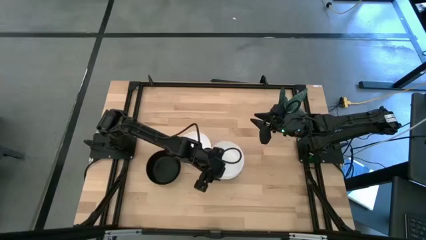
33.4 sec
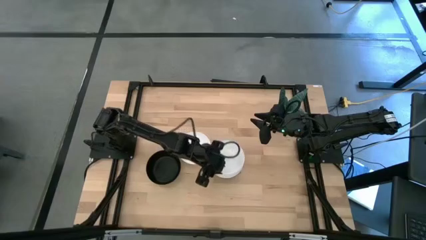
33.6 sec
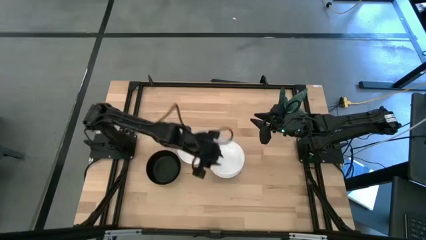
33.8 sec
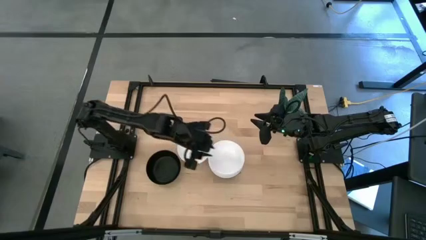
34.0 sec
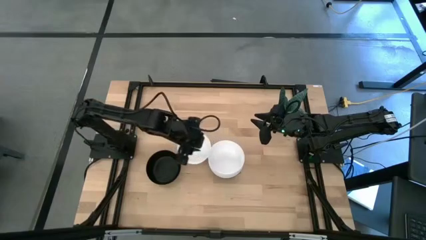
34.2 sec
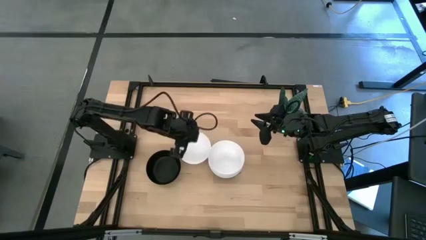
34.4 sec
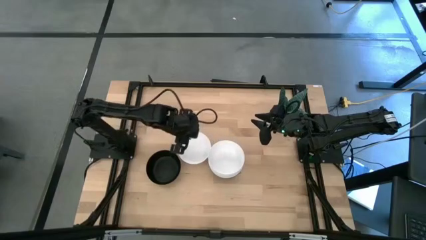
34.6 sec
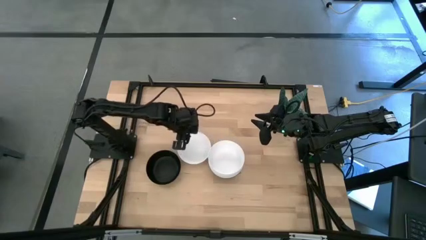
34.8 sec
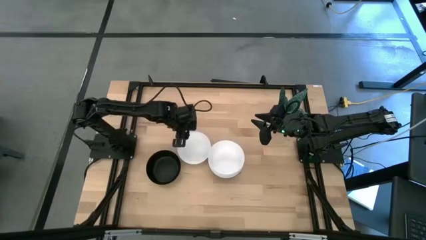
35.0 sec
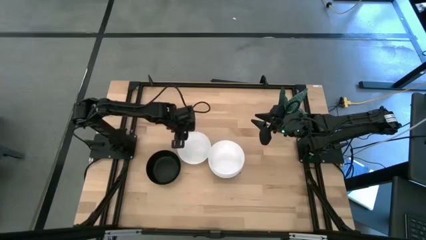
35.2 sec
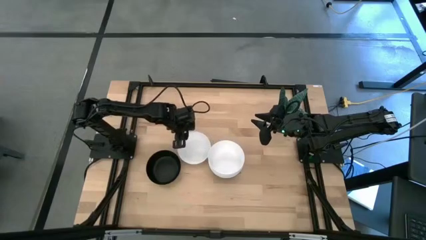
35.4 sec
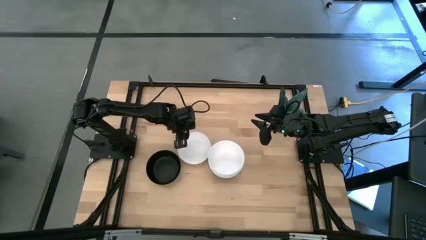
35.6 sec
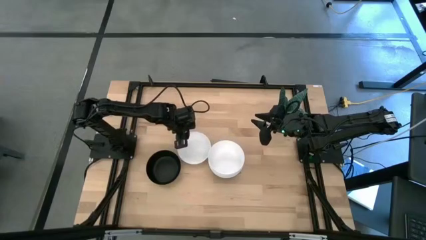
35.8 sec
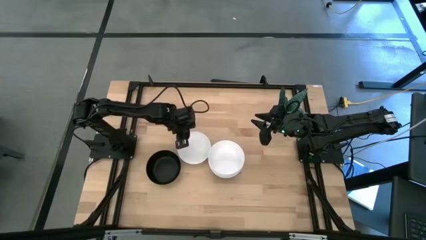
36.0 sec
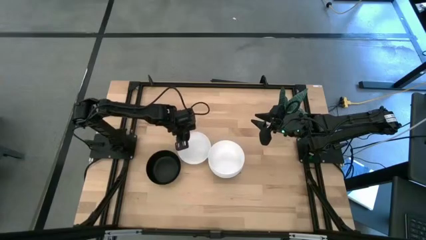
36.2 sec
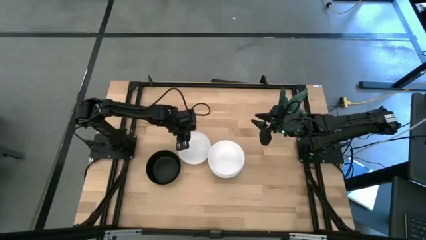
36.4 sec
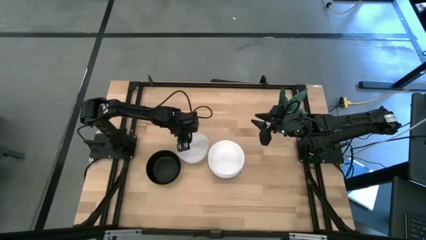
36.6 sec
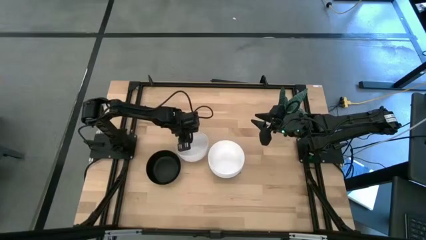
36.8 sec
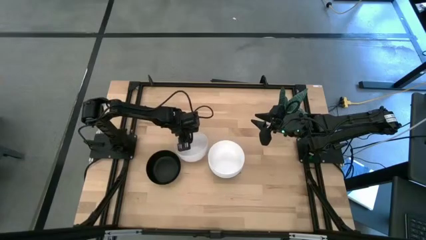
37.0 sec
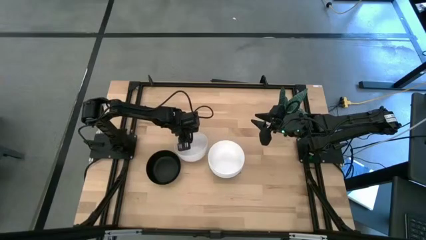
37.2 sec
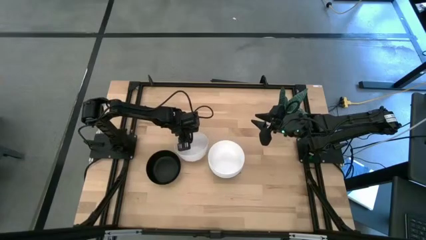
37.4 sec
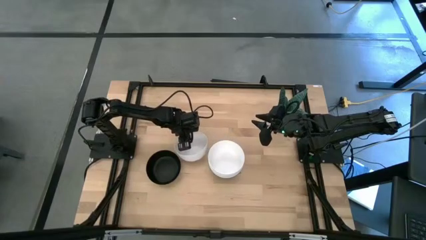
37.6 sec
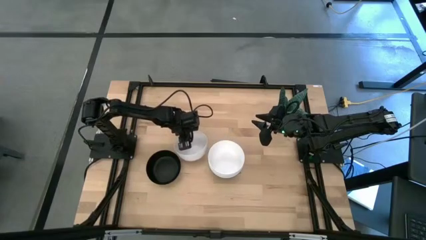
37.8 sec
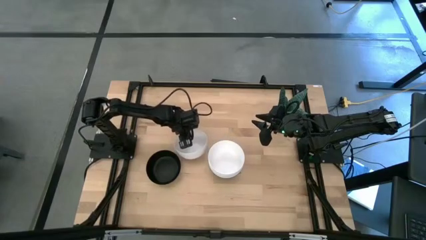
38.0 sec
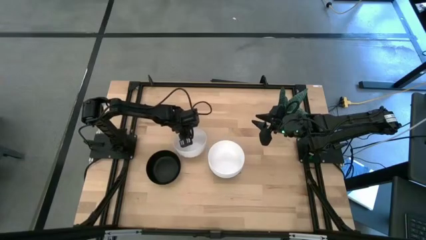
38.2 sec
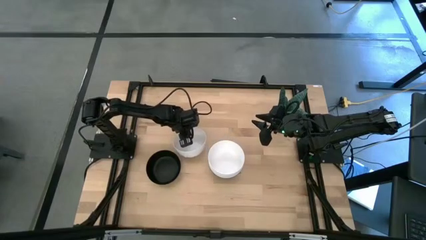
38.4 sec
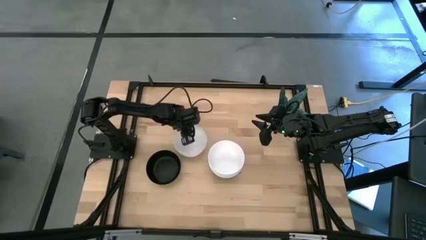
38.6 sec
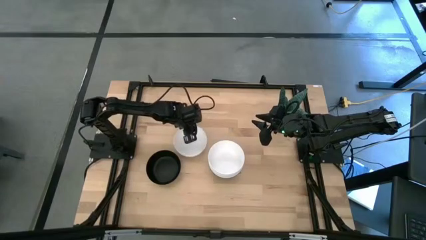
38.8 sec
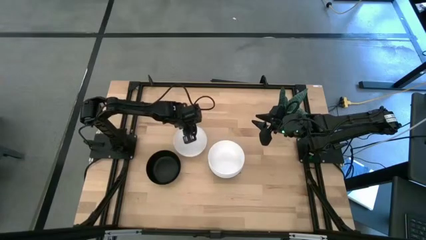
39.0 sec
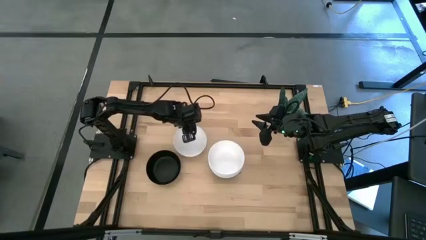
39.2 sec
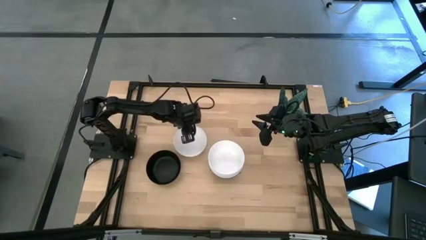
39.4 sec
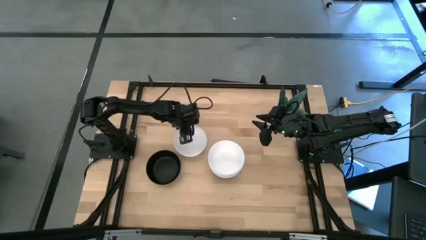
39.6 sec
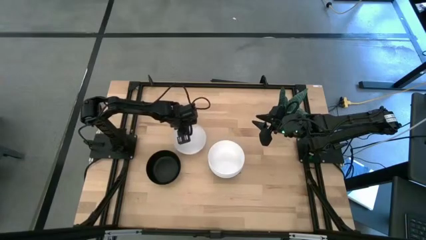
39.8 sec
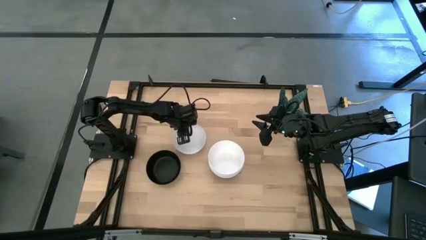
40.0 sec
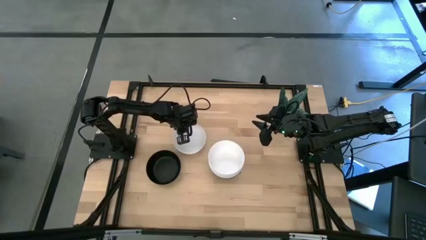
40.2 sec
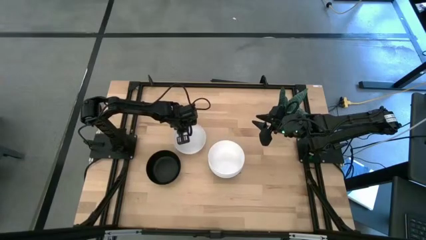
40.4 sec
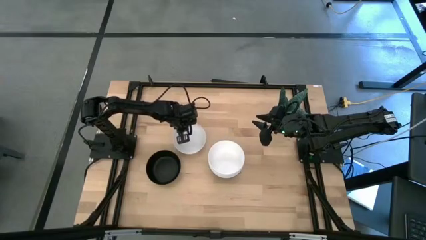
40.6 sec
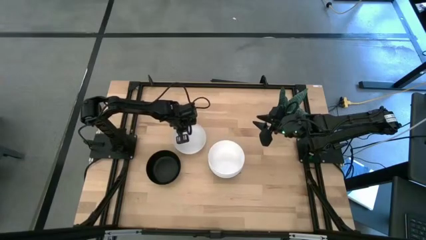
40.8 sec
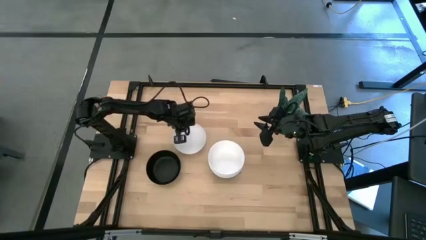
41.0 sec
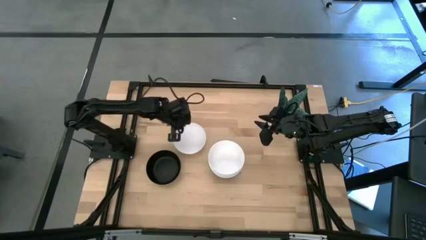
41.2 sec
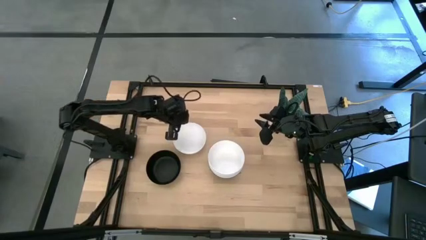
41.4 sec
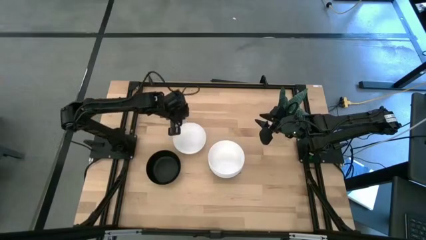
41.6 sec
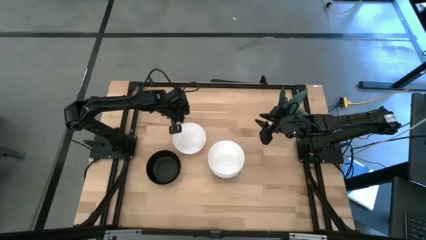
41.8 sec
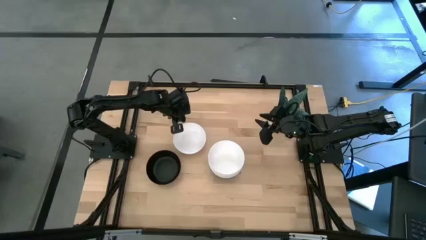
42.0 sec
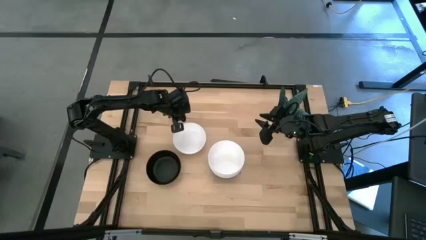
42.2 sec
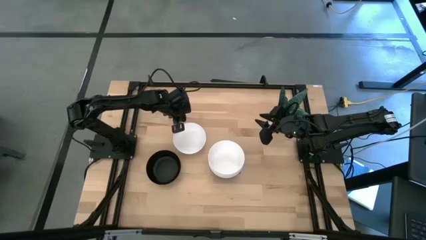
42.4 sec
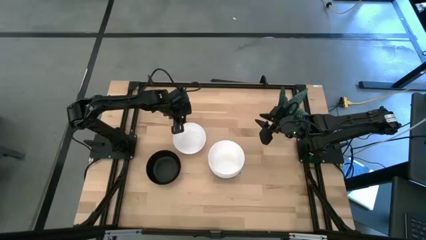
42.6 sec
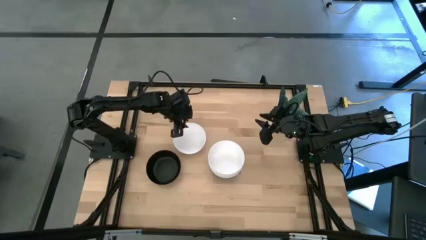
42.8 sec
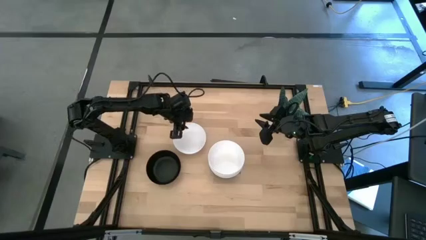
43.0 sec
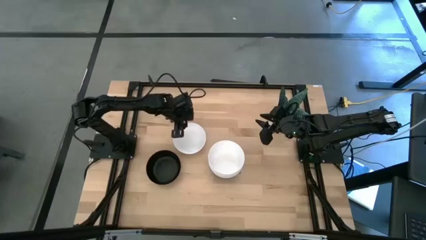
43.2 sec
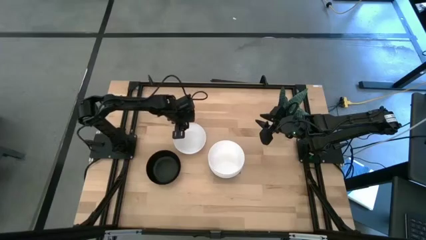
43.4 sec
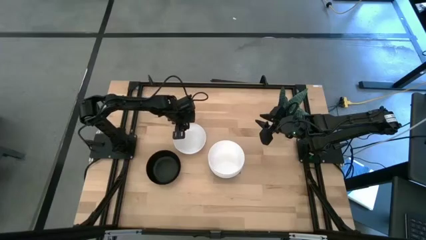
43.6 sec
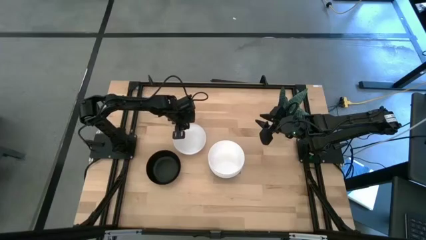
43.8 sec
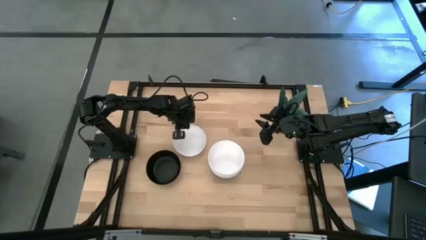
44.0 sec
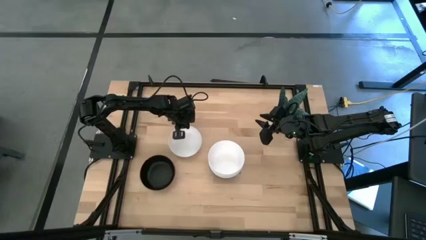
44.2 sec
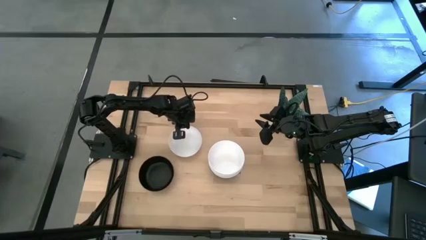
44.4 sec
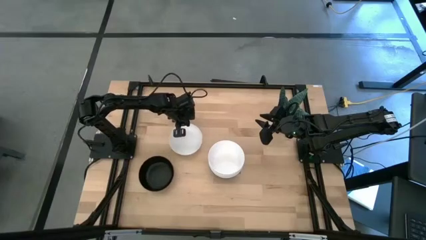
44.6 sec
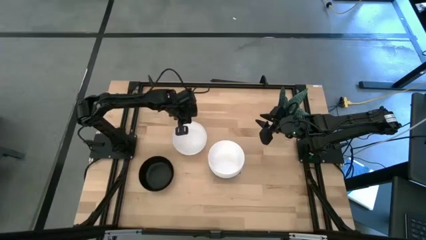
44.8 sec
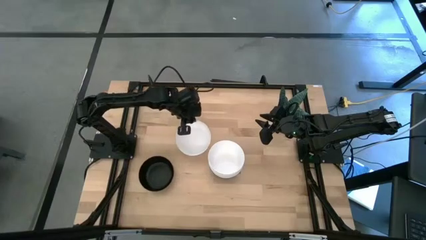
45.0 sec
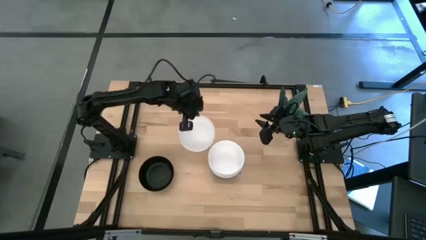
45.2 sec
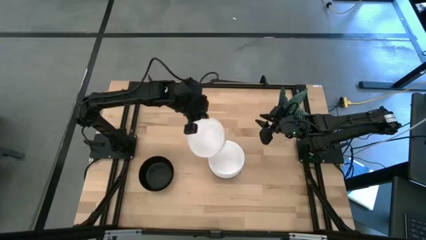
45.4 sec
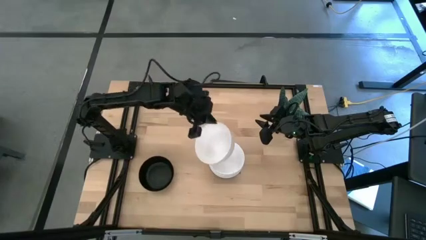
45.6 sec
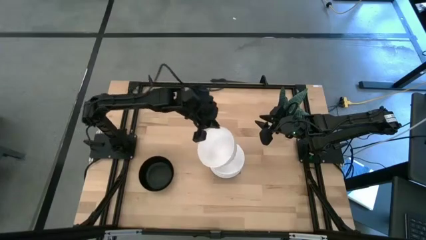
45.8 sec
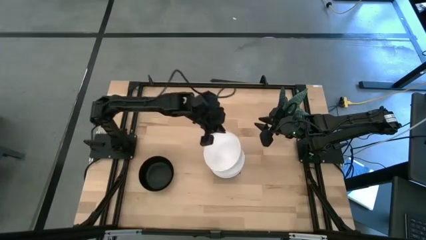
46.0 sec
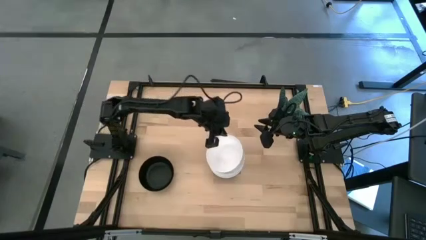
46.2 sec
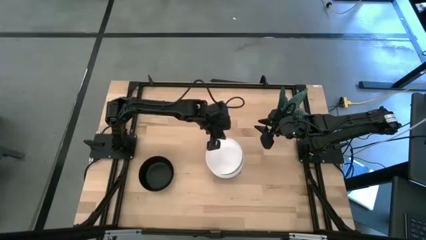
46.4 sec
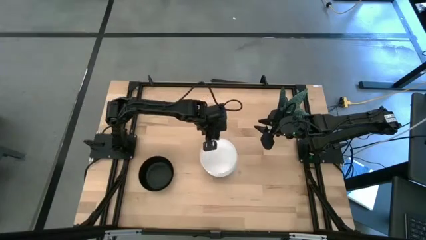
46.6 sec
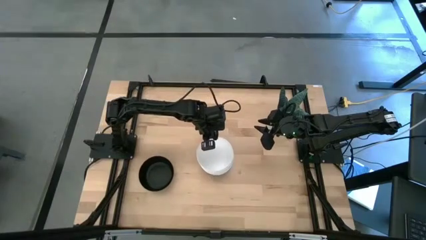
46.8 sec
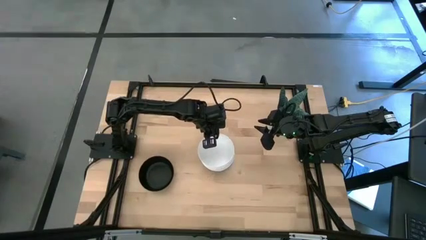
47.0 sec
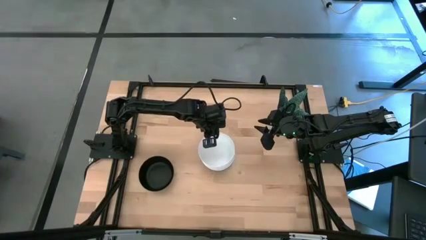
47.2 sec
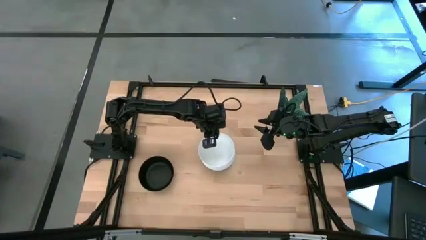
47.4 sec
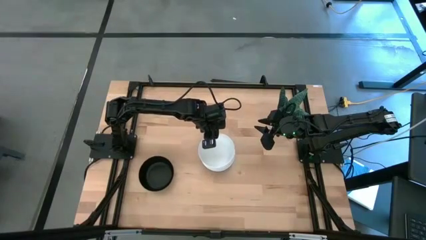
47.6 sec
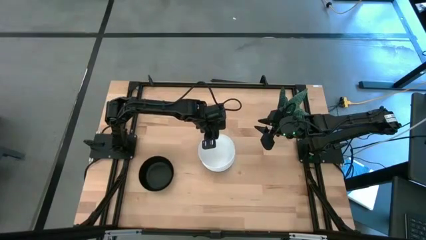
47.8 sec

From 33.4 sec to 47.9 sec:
Task: Nest bowls inside each other
Stack the white bowl on top of the stacked bowls
